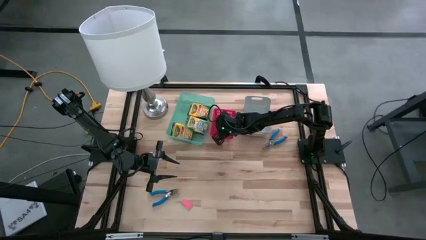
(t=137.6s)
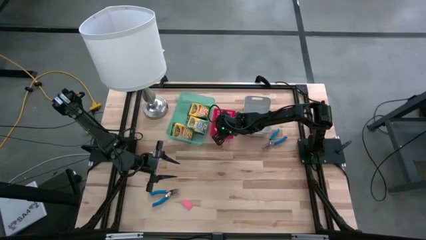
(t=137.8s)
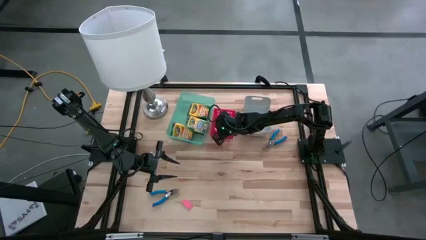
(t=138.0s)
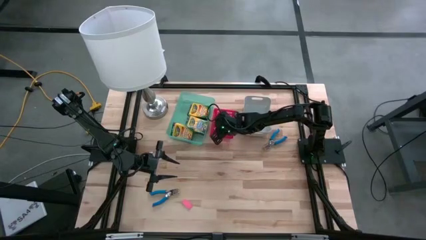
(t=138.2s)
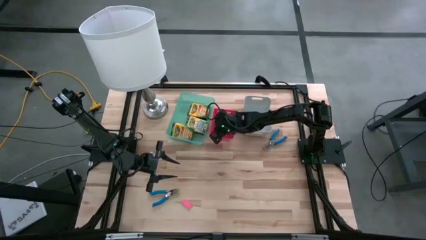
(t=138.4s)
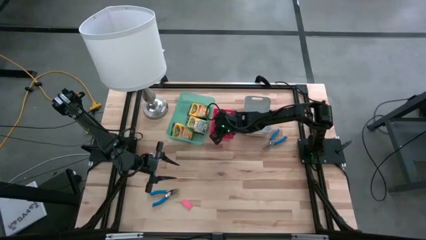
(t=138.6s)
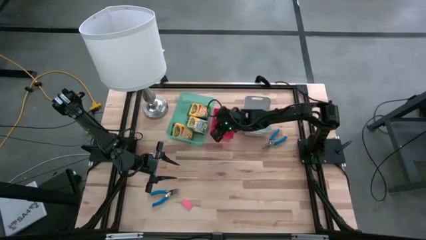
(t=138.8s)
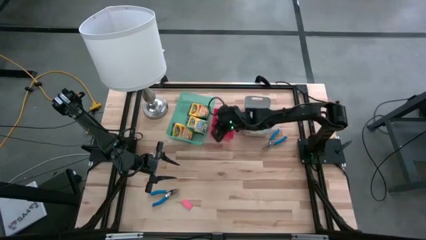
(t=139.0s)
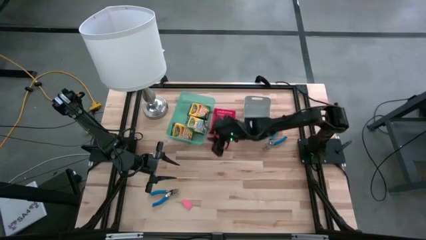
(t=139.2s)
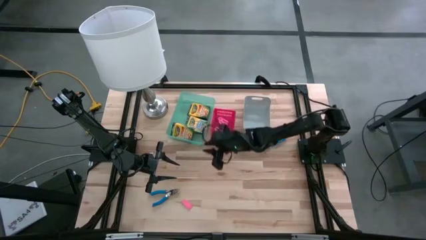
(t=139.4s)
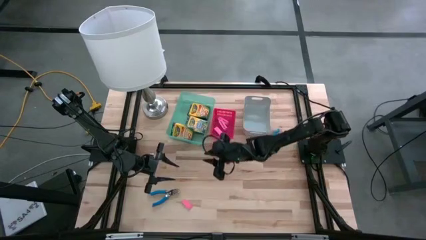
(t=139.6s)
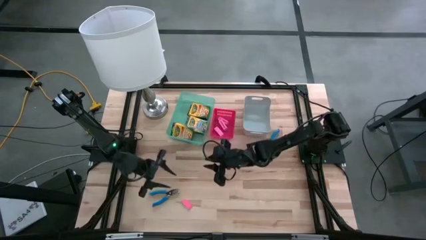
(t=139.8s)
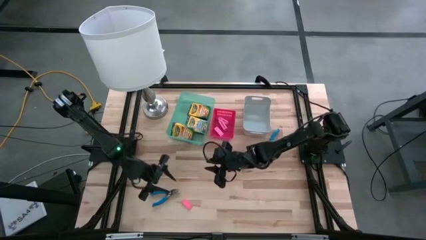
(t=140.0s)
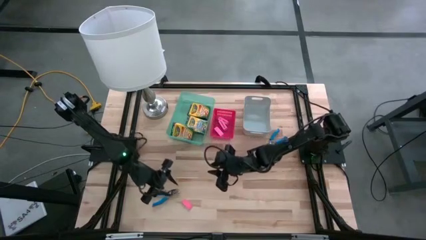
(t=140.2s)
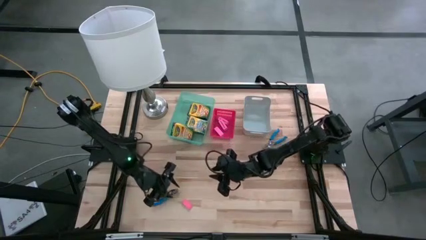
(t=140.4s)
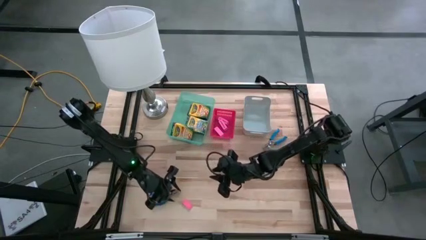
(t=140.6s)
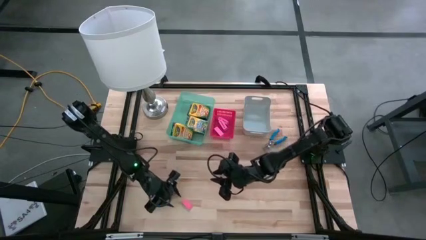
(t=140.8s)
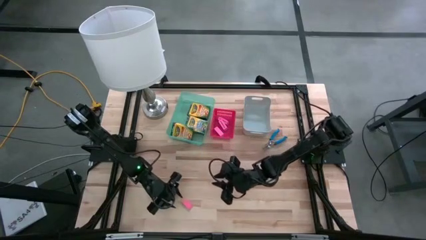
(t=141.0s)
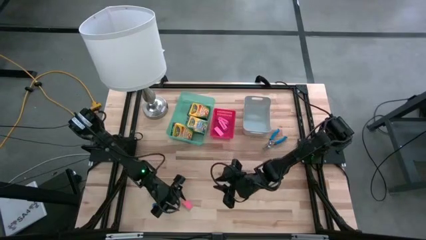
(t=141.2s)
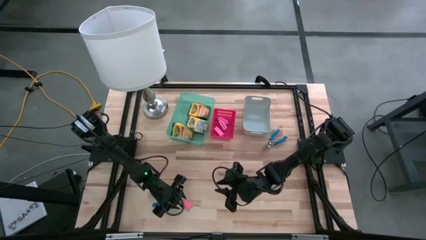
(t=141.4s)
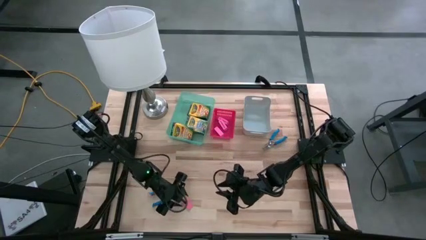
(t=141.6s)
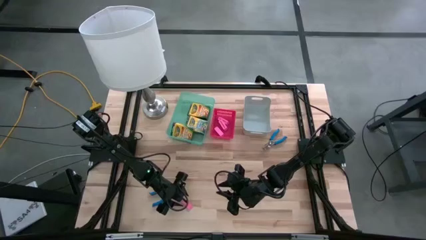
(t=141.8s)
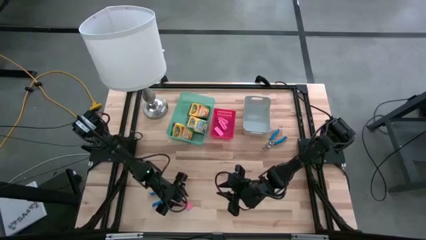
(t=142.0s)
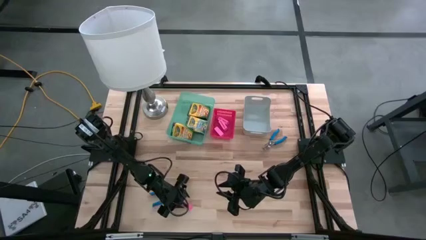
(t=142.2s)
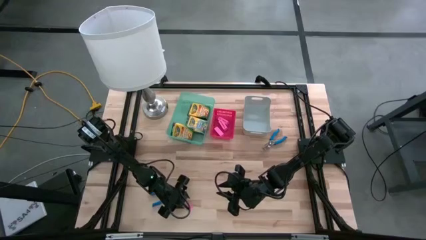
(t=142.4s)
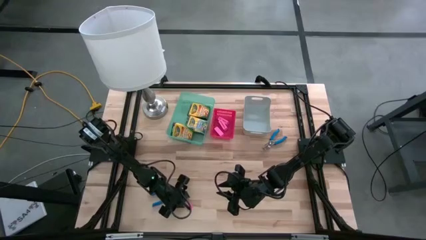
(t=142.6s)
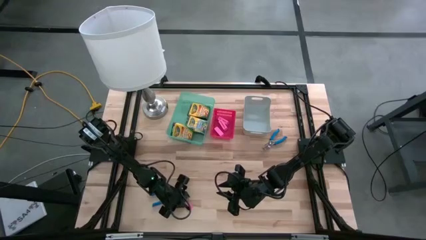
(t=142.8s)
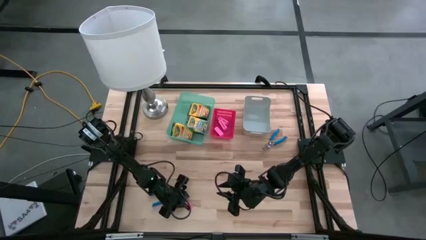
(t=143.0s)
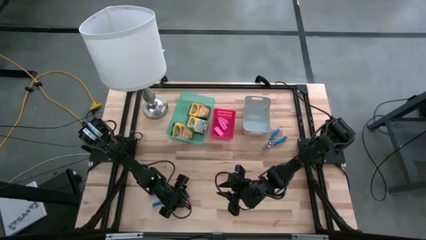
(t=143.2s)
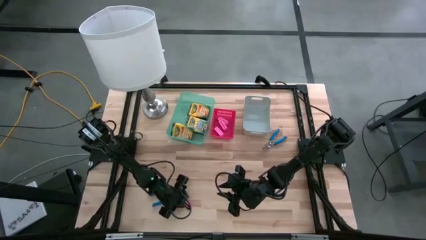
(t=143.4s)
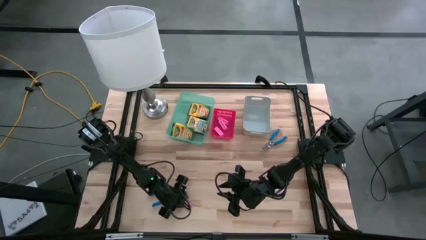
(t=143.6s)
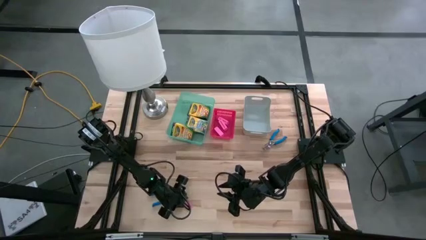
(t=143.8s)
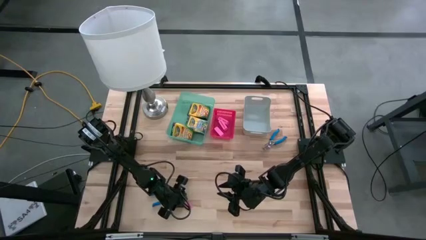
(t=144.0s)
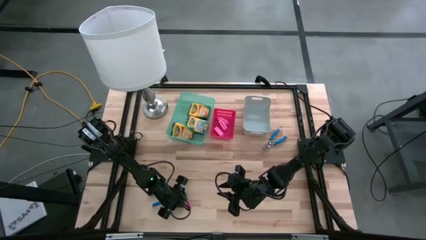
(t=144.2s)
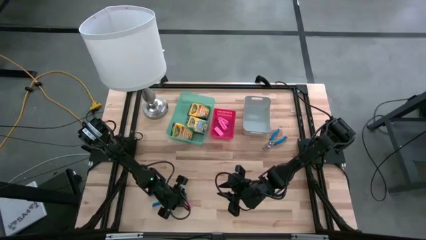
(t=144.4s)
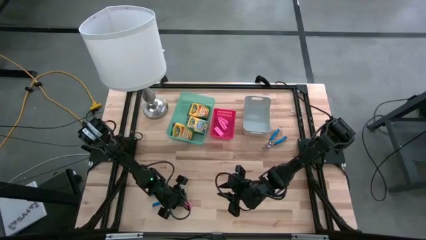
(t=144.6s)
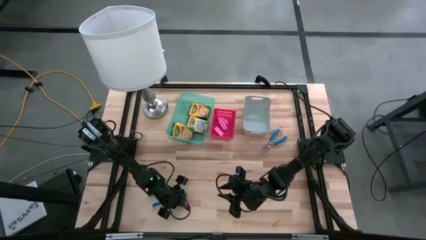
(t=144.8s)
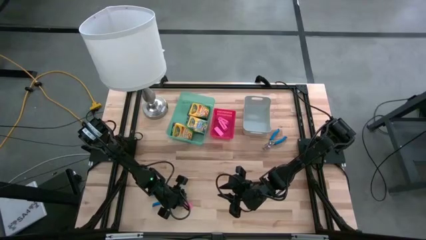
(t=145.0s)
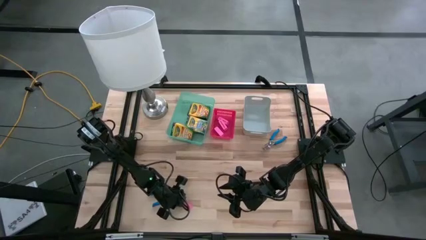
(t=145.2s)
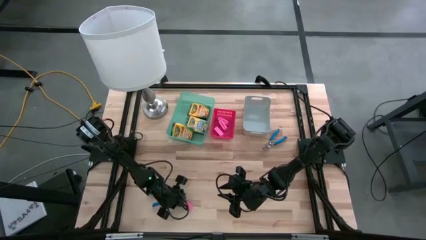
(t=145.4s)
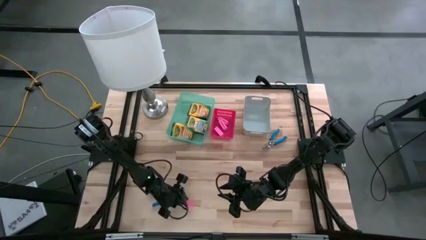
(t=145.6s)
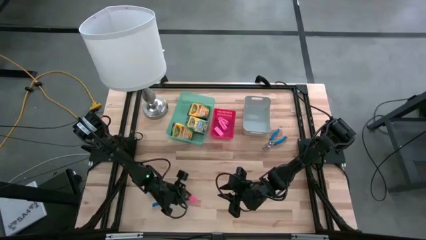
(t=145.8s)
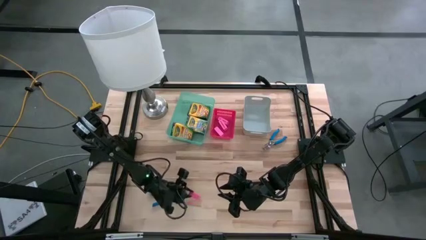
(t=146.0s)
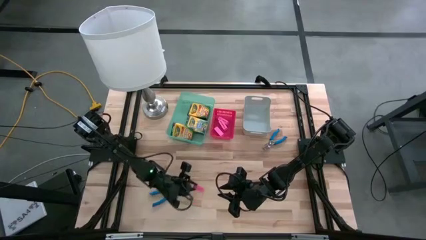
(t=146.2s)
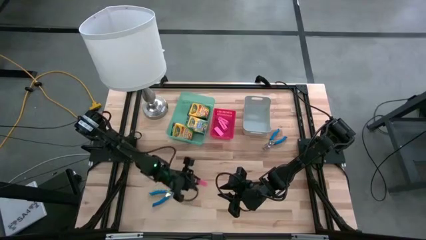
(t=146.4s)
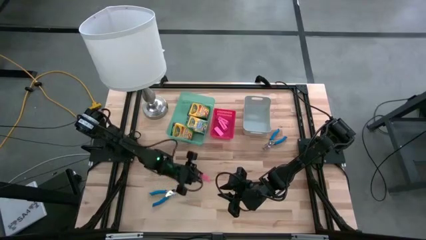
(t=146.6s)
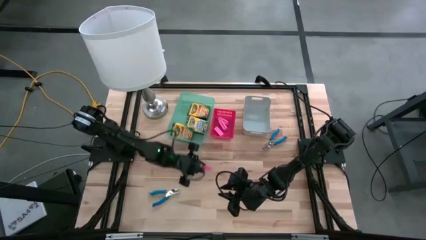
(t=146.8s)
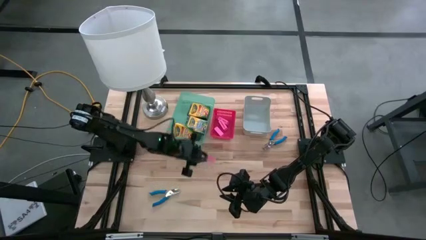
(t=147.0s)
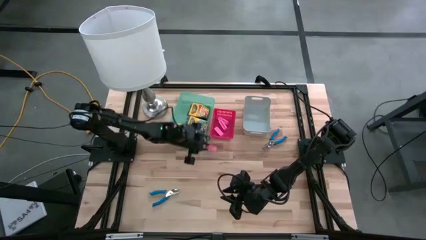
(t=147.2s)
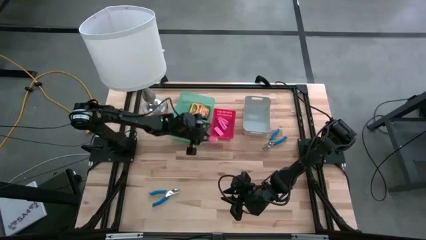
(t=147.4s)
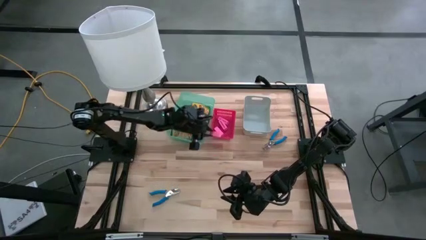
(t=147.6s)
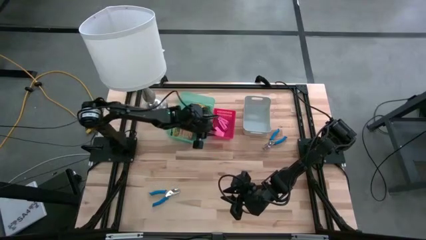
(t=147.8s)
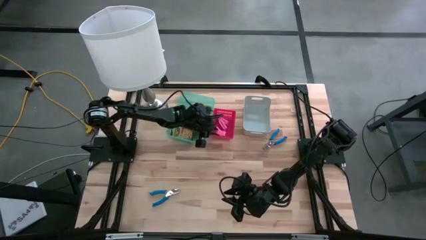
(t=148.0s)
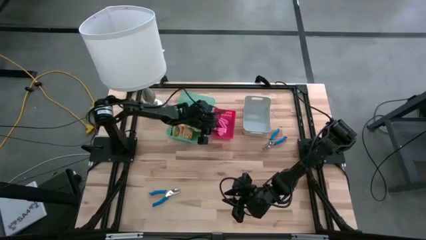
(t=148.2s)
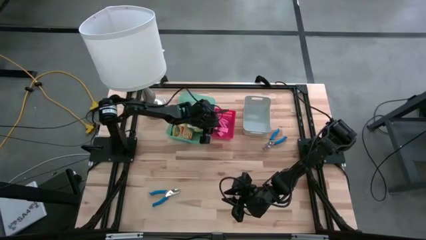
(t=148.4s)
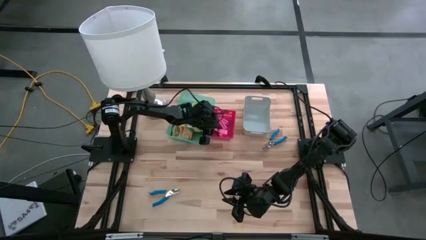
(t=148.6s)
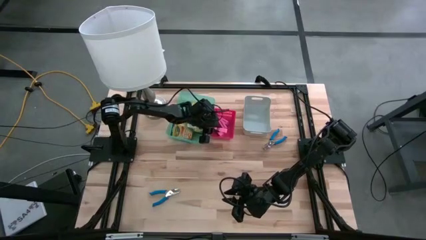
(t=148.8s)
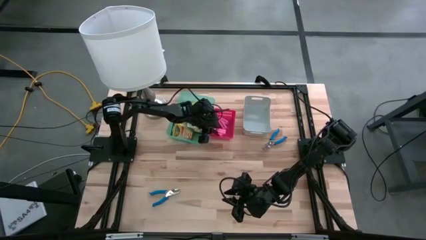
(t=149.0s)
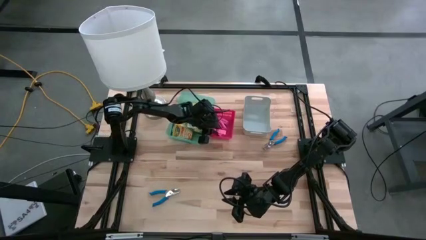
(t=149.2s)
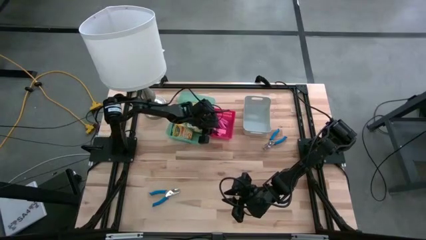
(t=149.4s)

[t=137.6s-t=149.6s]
Task: Pick & Place School Supplies
Put the pink eraser into the red bin

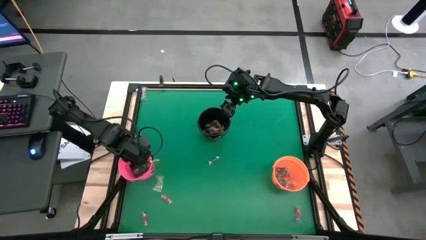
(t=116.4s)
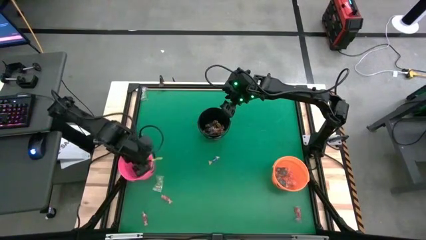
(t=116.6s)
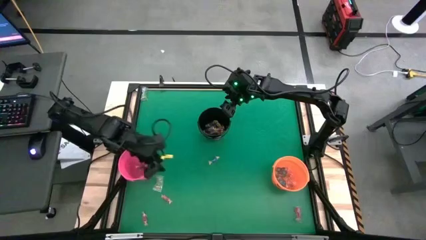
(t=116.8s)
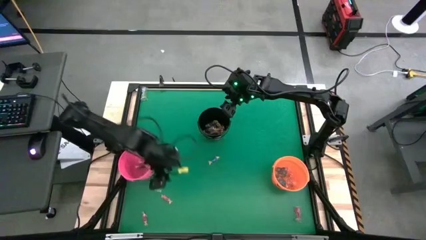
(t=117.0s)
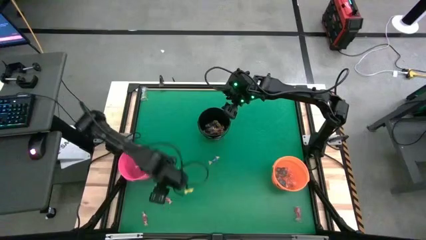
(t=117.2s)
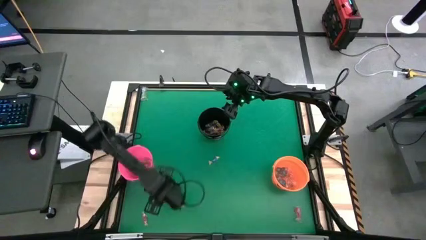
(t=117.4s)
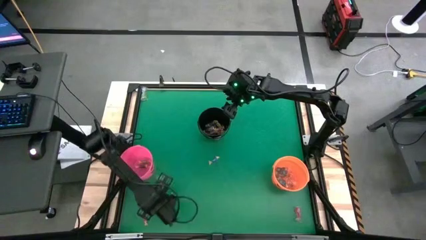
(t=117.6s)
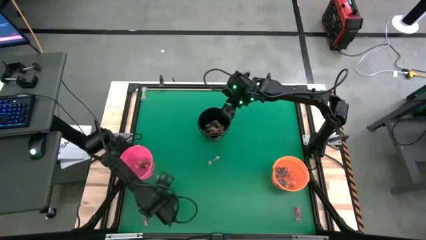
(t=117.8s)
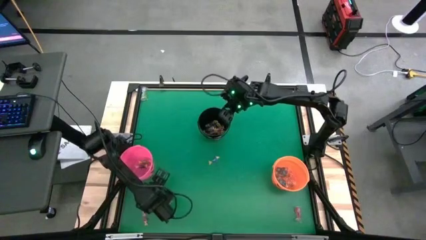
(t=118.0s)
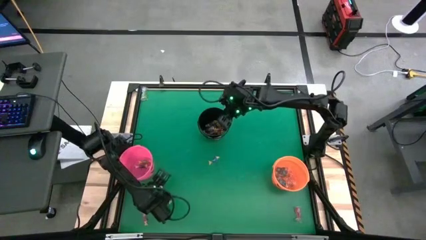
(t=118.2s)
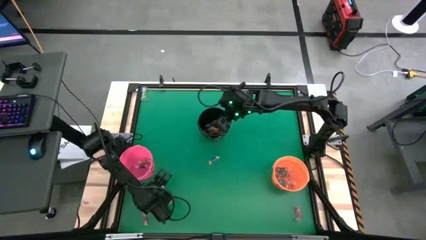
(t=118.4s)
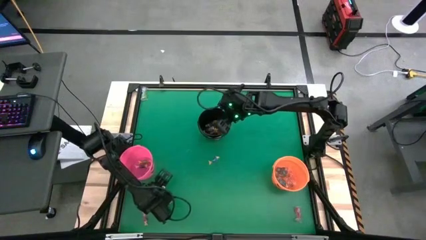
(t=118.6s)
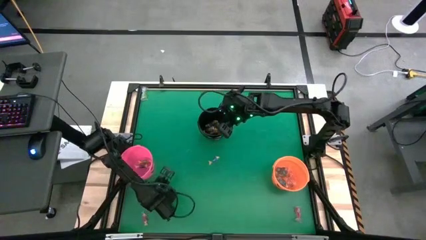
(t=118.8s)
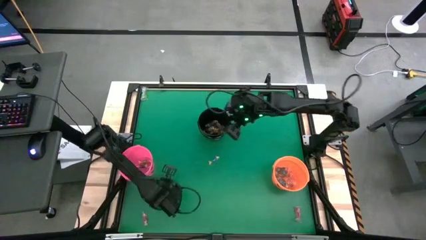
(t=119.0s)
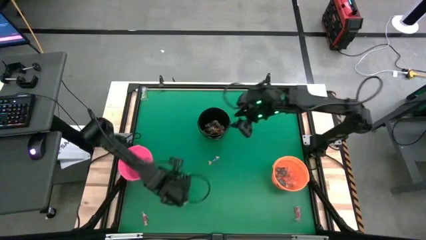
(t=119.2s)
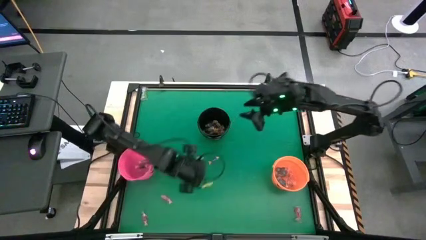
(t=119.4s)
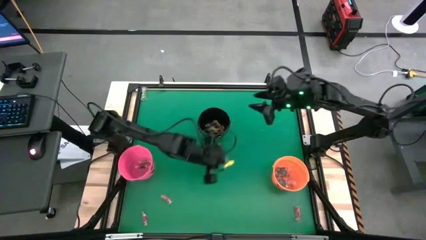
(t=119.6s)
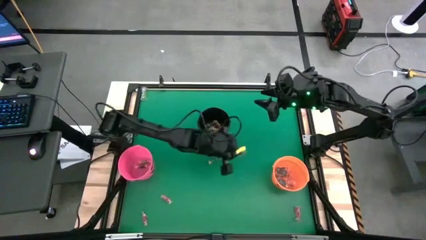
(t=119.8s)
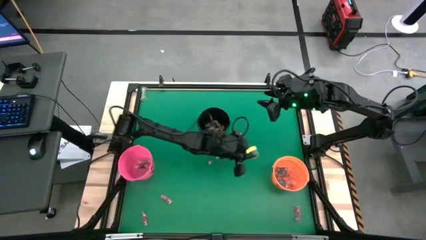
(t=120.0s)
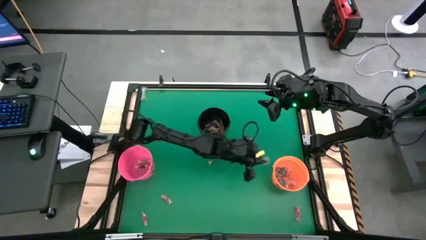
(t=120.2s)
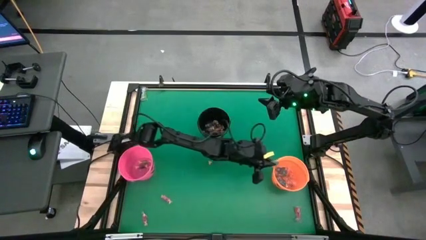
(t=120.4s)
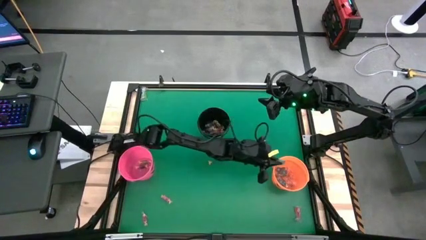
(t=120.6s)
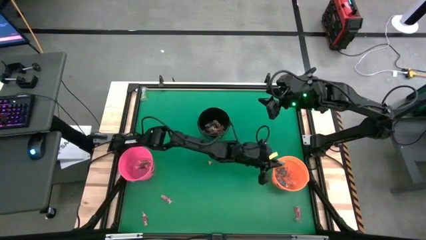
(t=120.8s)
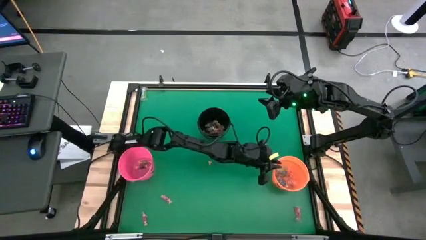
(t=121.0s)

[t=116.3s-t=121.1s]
Task: Sort candy by brand, put in halloween buckets
Put the green gummy into the orange bucket
